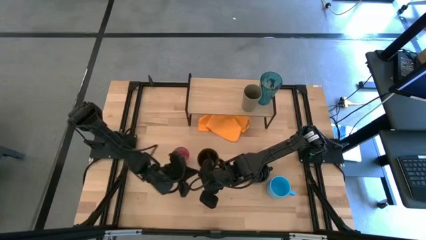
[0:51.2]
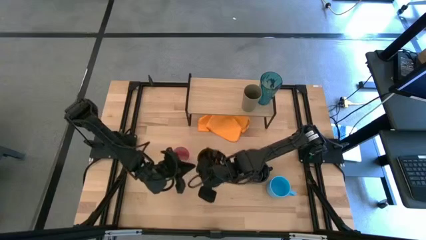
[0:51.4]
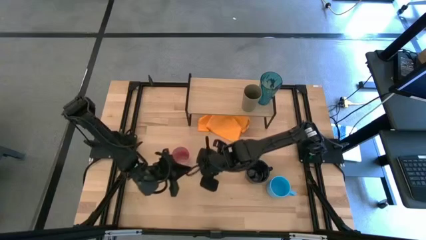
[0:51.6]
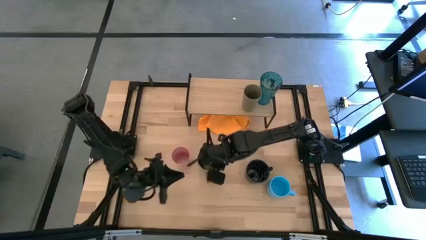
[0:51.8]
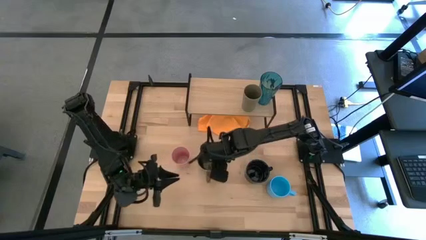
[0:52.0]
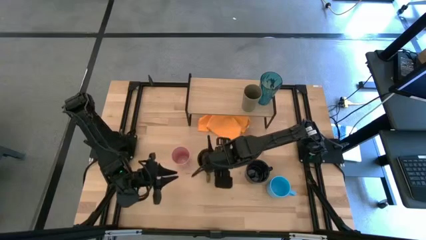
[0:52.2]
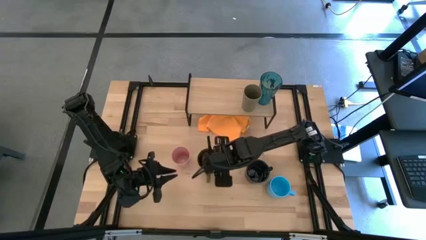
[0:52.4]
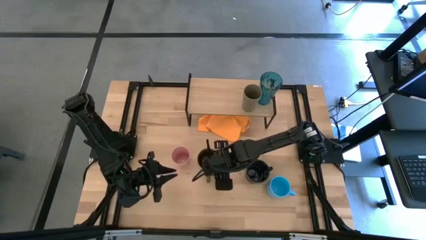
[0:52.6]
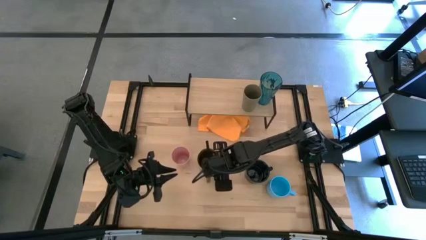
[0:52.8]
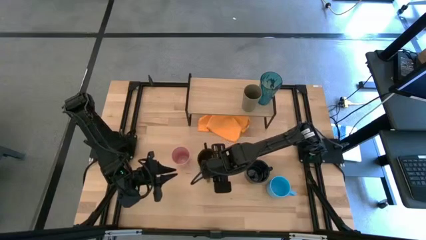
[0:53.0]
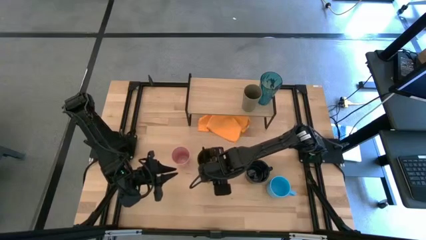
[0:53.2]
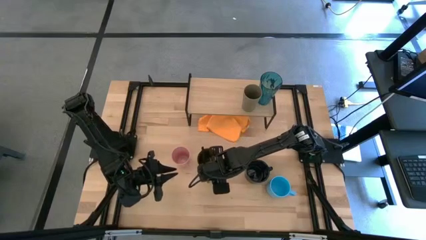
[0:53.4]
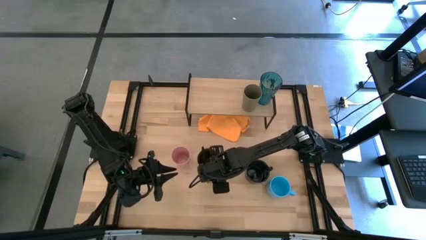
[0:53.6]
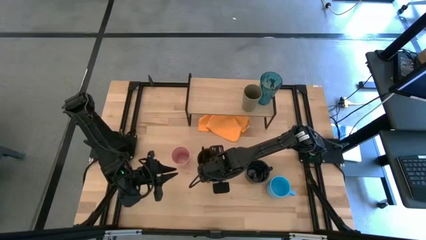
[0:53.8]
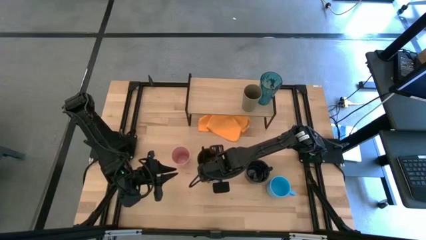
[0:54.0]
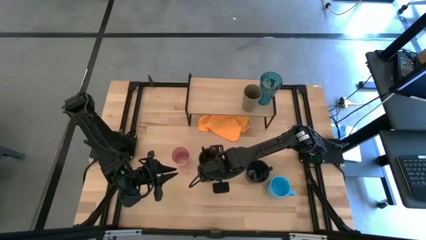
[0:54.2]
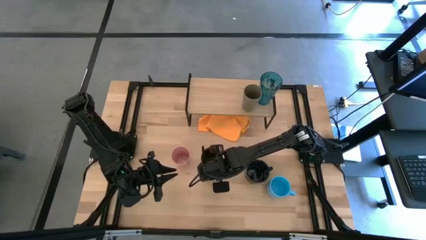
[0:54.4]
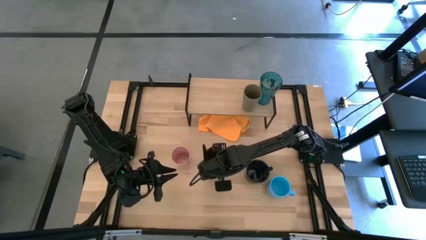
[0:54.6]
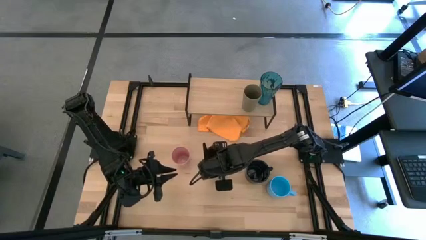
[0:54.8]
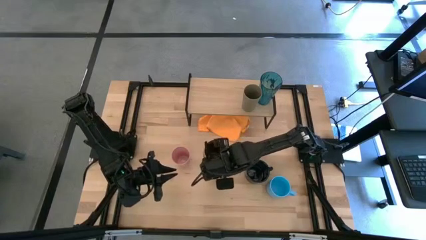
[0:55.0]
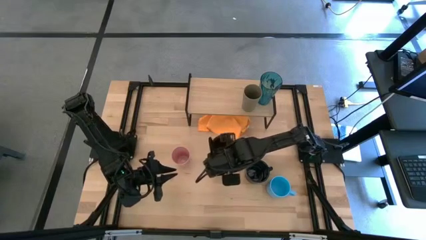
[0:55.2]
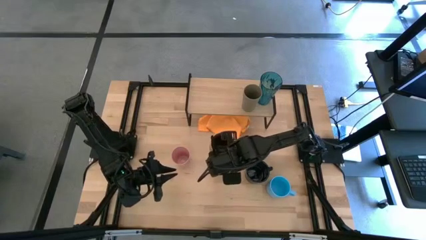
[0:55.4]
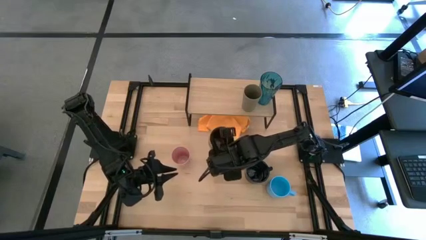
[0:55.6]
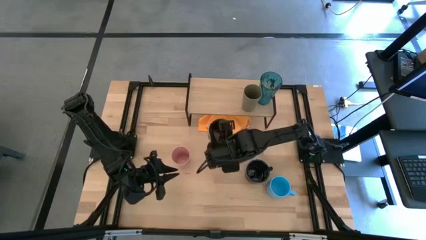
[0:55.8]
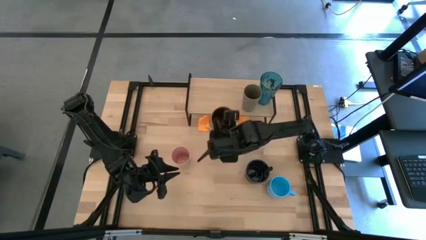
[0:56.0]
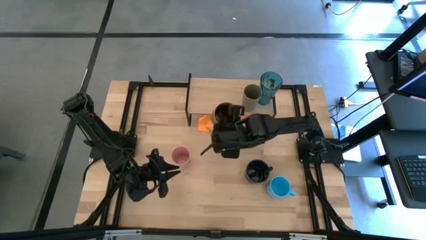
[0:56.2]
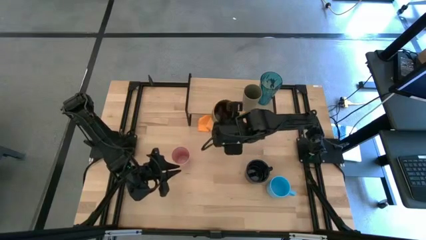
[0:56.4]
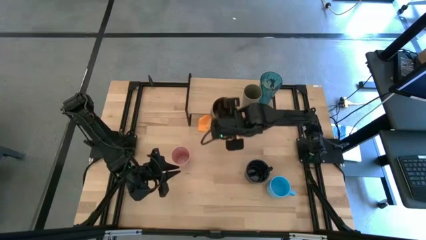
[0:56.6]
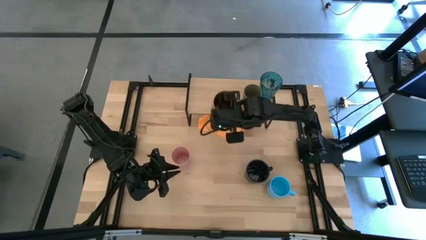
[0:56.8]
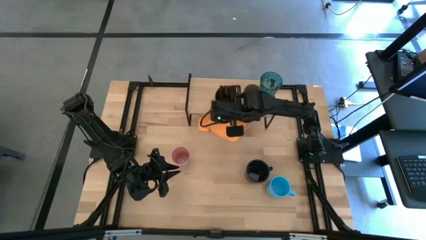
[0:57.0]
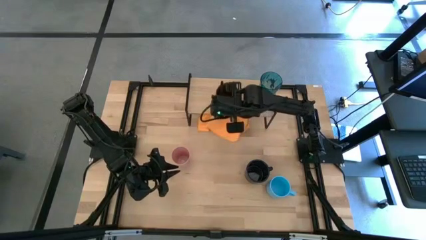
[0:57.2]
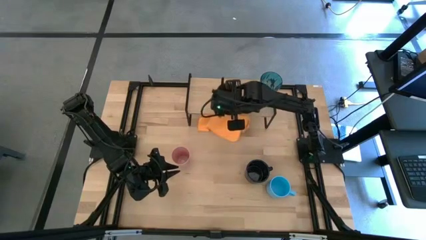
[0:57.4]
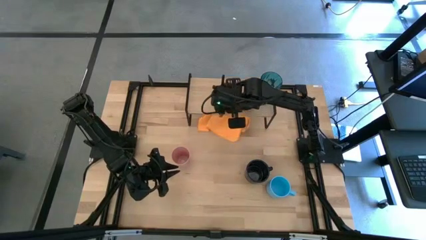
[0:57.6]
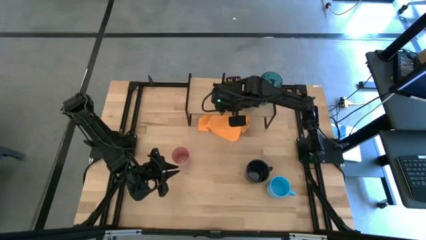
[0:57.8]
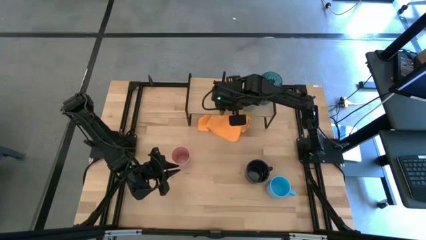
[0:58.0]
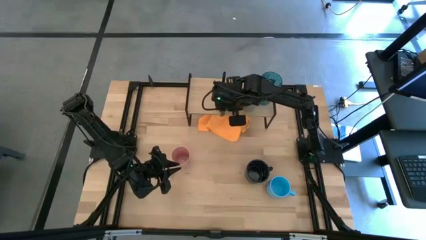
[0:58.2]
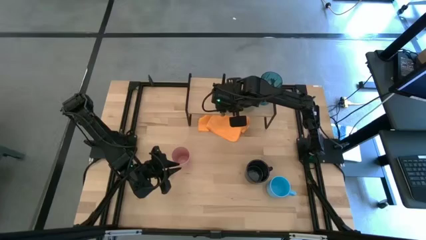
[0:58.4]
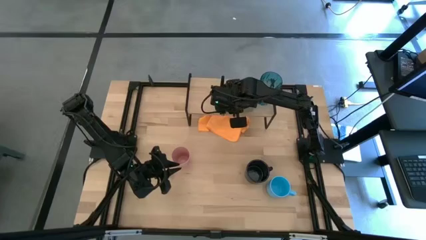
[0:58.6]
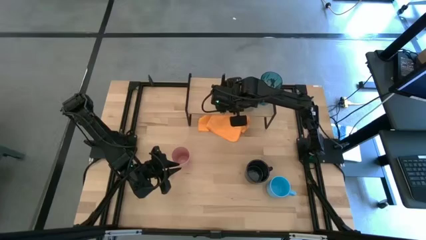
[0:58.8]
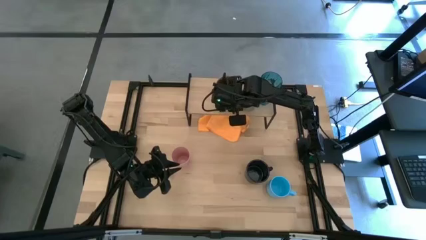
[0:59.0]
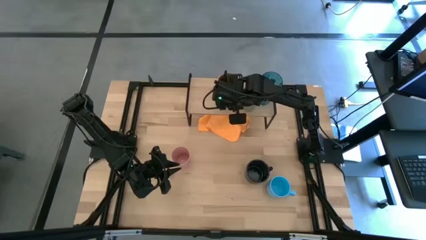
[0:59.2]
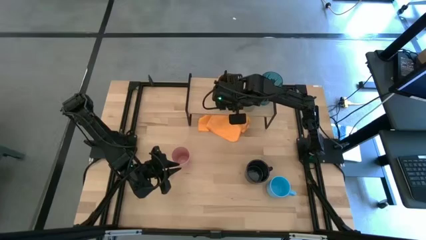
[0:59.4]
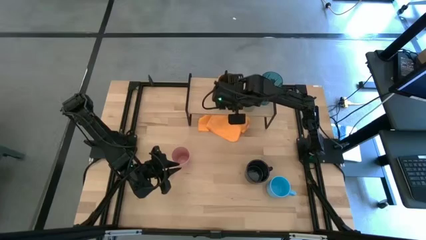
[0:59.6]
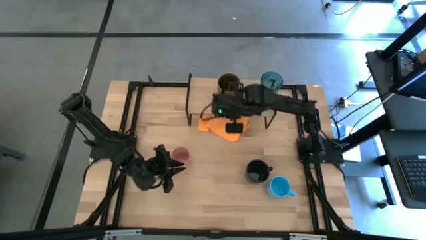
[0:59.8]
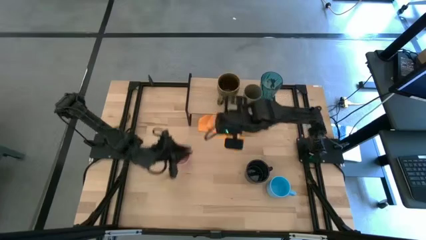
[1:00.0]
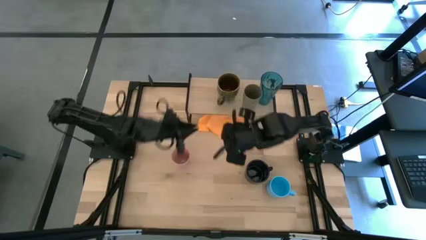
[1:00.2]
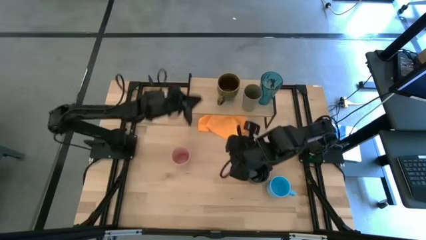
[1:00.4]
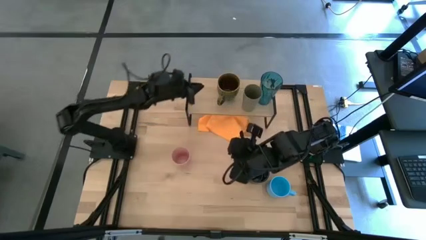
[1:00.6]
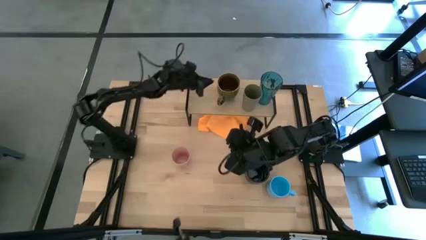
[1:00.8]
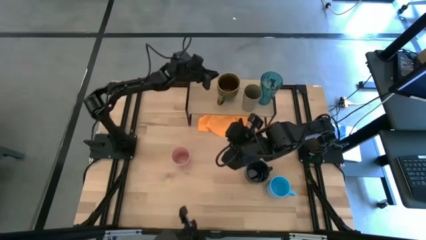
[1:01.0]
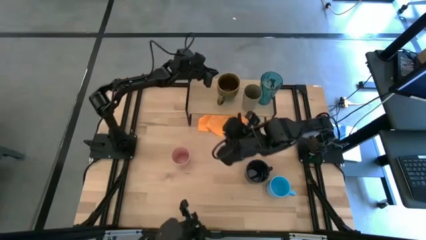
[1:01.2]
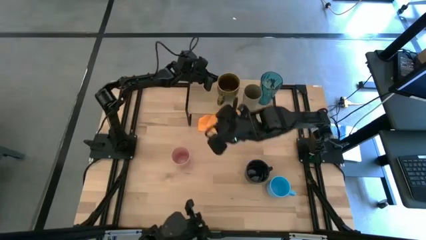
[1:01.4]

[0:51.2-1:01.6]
Task: Stack small to large cups/mugs on shelf
Put the brown mug on the shelf

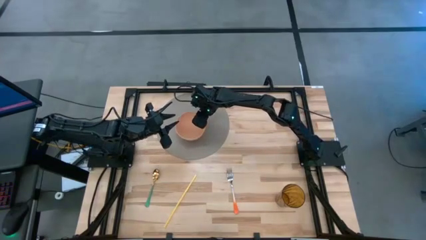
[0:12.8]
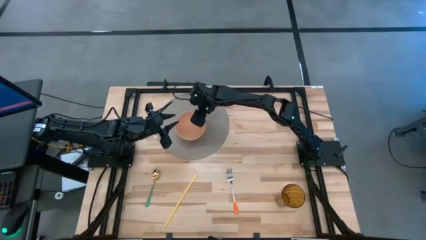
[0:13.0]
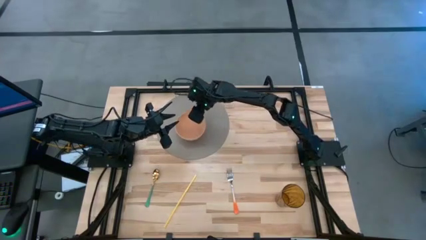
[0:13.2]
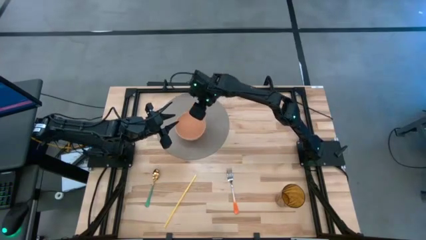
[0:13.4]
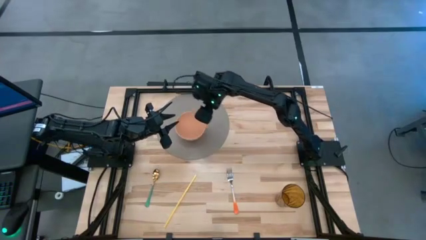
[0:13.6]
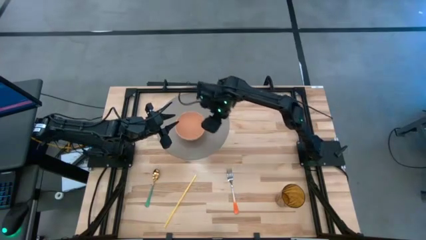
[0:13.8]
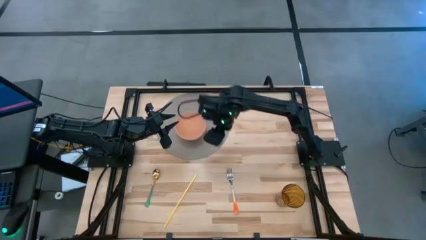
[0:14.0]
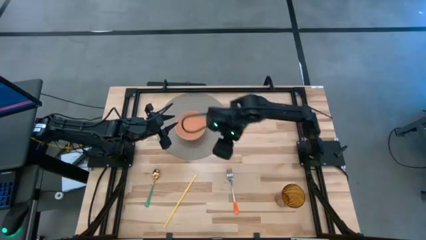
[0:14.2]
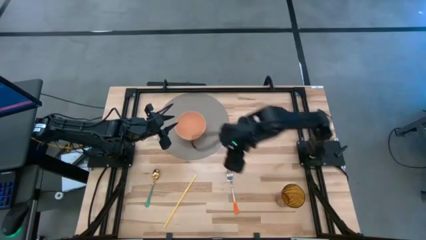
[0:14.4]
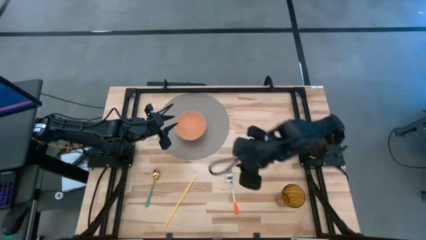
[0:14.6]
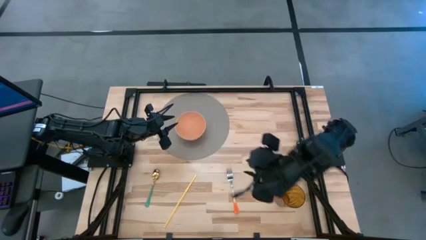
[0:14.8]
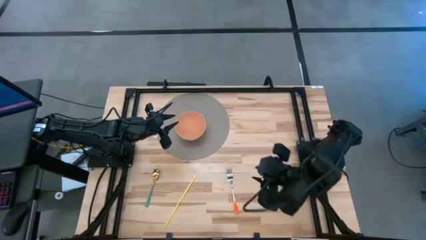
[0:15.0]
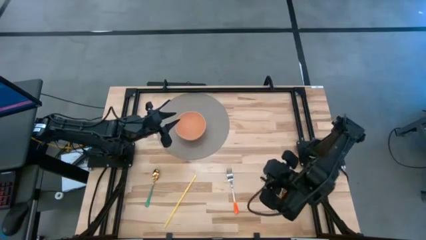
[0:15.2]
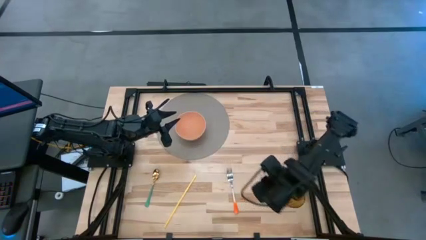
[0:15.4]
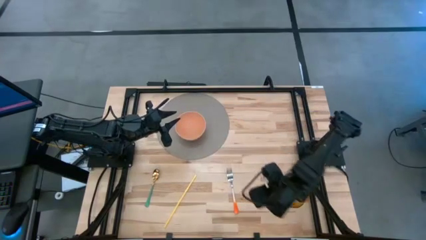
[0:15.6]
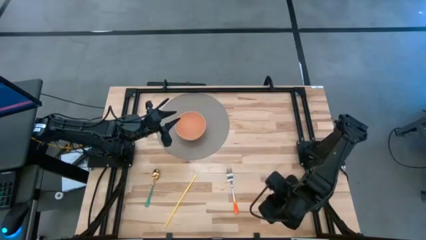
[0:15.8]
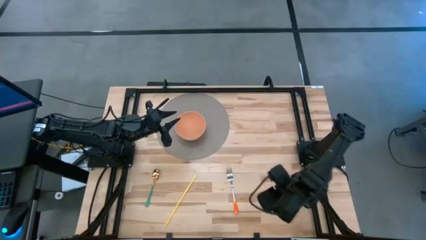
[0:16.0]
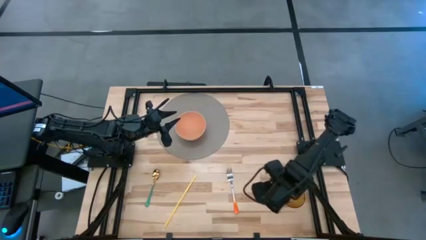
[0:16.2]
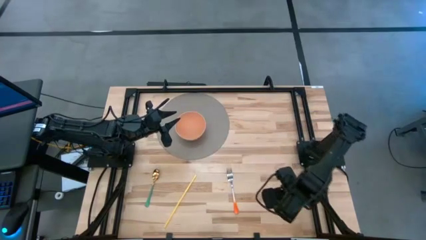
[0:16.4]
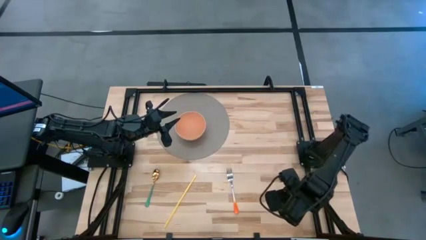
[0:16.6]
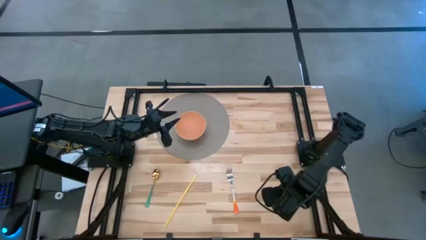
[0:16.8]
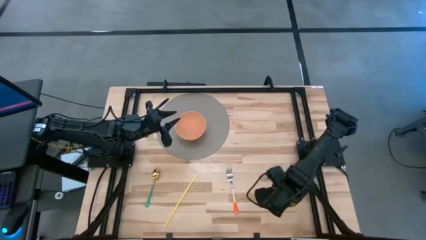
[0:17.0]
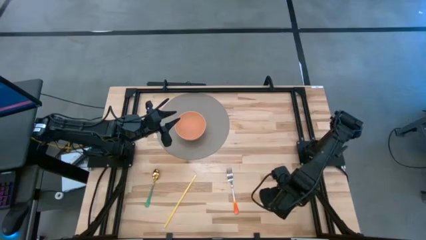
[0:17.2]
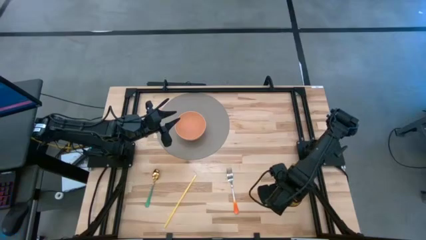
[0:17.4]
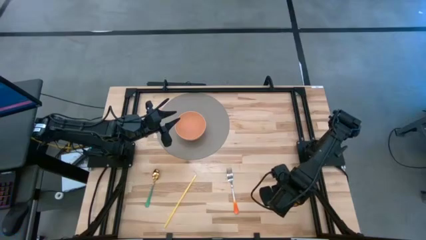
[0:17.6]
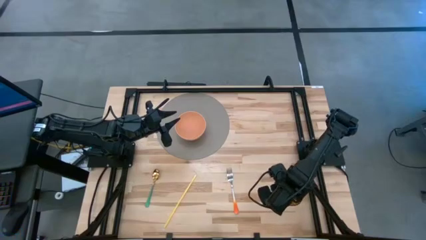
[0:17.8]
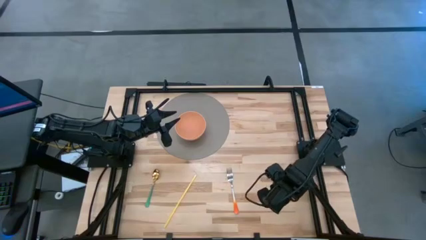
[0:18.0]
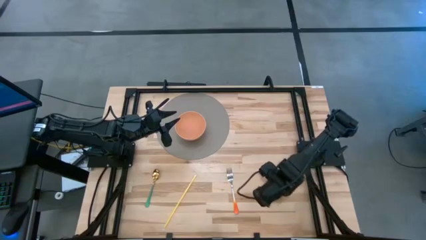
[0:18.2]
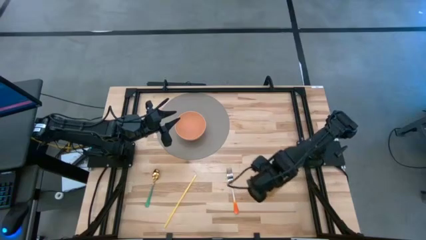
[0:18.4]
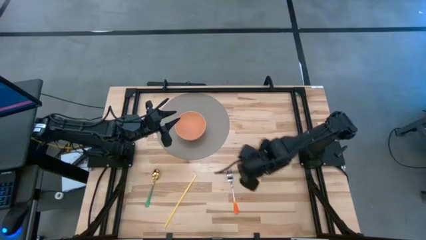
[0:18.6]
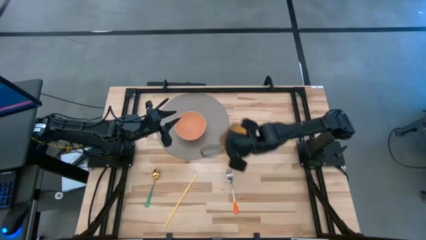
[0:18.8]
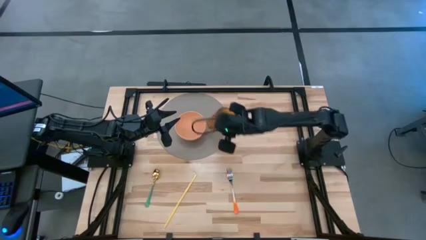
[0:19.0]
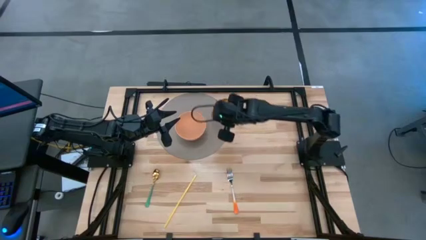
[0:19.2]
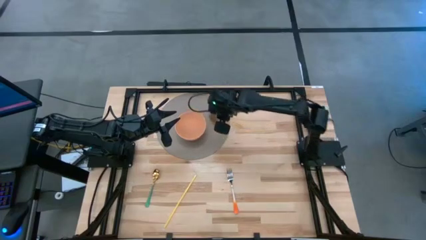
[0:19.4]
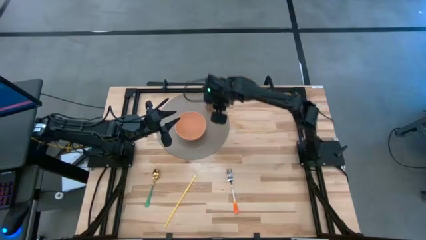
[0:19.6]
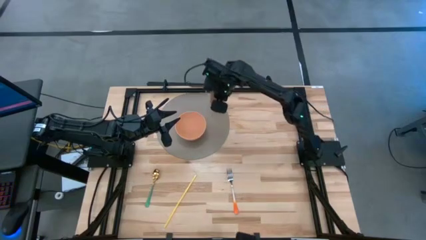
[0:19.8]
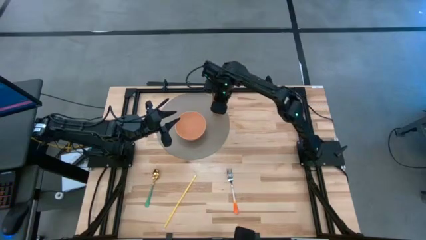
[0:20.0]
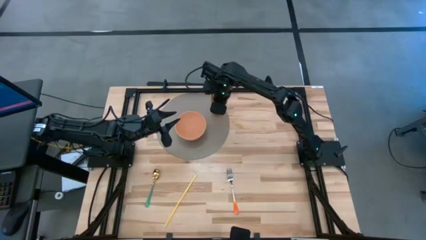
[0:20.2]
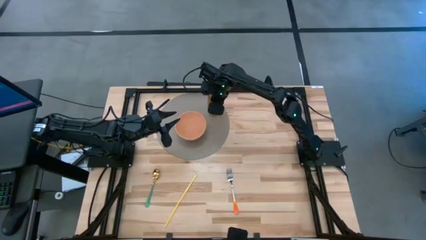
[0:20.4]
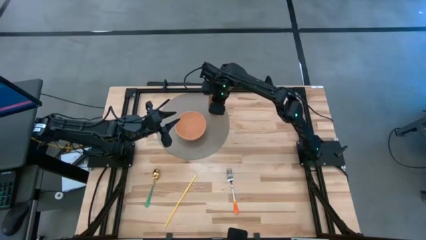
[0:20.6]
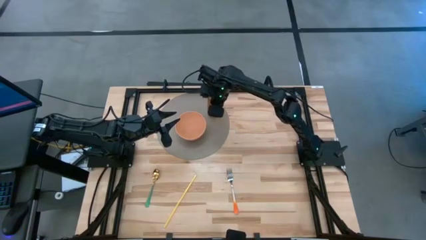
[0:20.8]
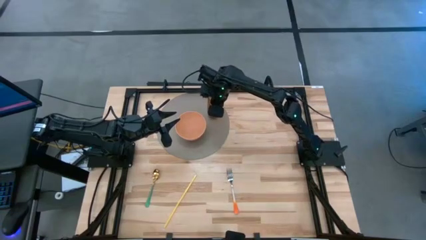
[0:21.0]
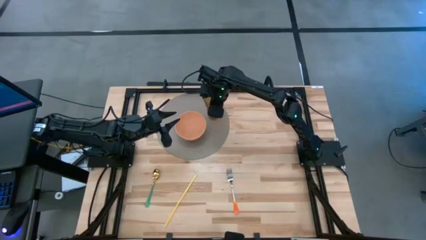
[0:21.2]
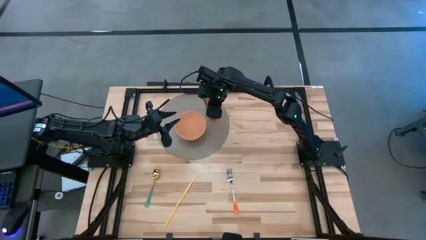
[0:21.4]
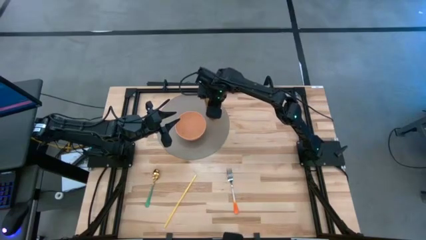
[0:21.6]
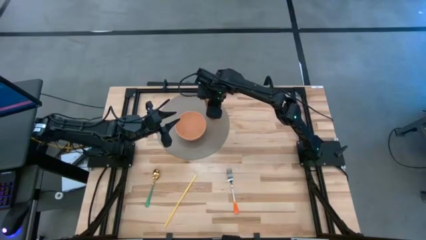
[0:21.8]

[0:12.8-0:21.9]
Task: Pick & Place Utensil
Put the brown cup on the top right of the orange bowl on the gray mat
